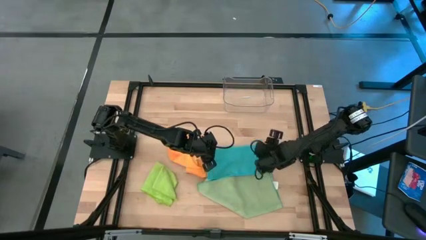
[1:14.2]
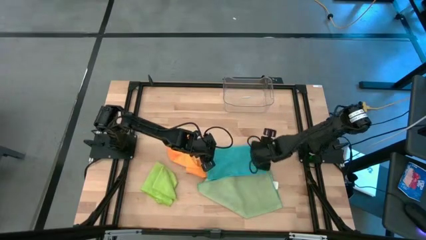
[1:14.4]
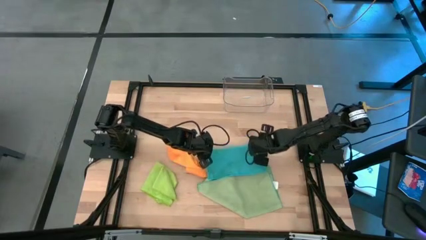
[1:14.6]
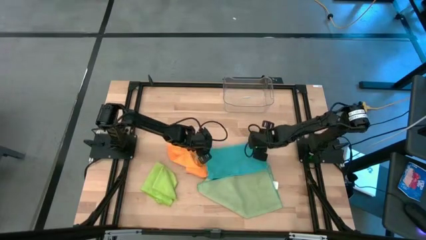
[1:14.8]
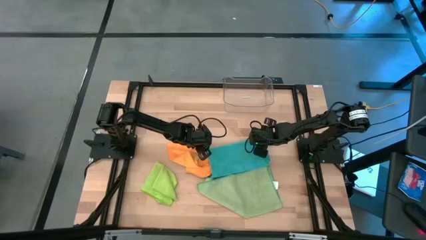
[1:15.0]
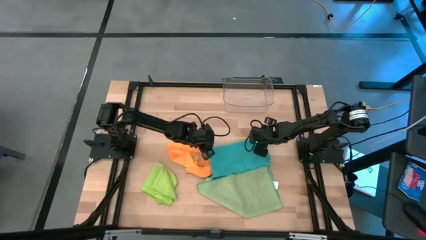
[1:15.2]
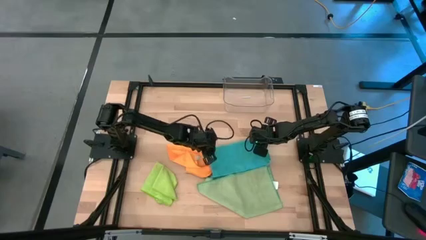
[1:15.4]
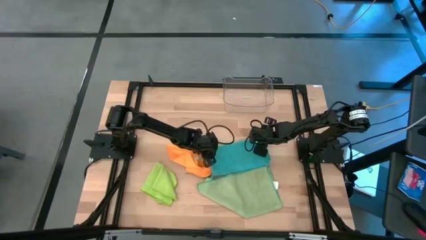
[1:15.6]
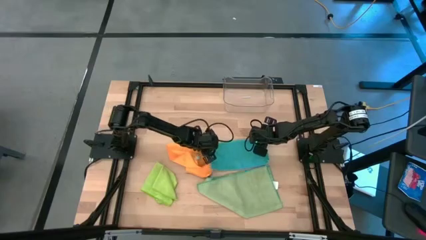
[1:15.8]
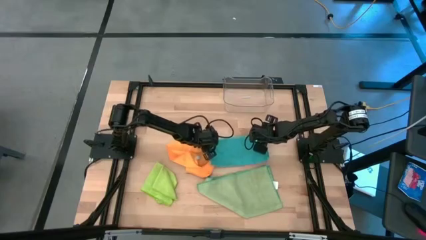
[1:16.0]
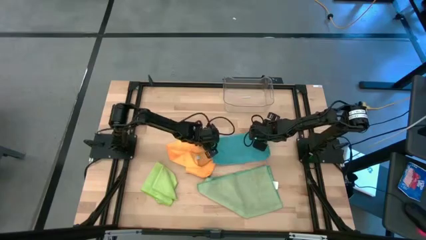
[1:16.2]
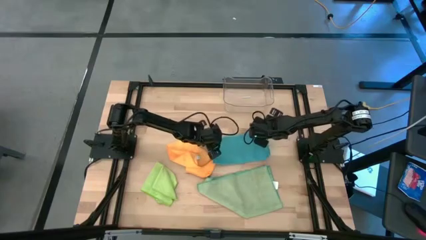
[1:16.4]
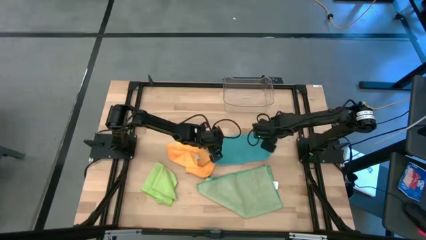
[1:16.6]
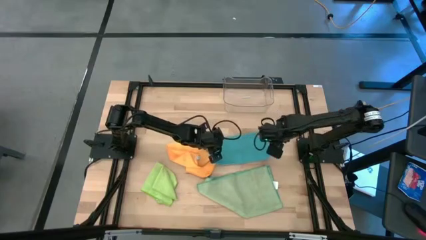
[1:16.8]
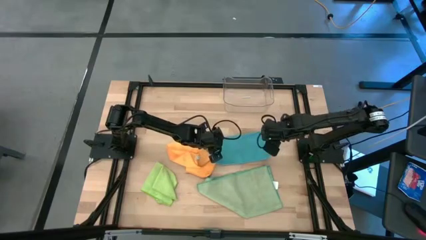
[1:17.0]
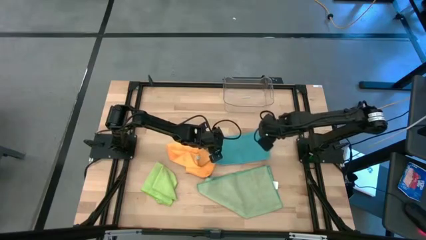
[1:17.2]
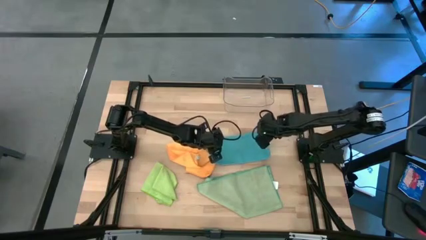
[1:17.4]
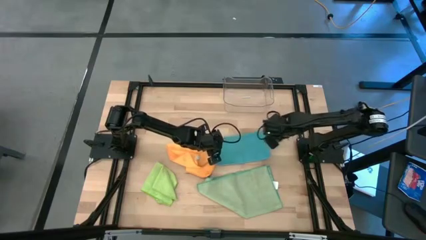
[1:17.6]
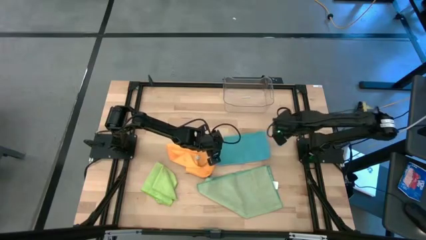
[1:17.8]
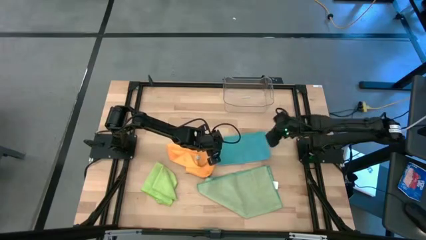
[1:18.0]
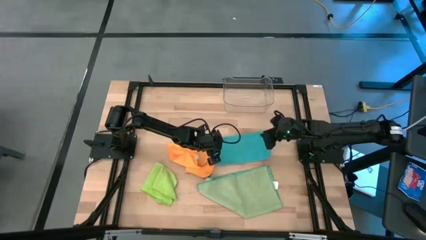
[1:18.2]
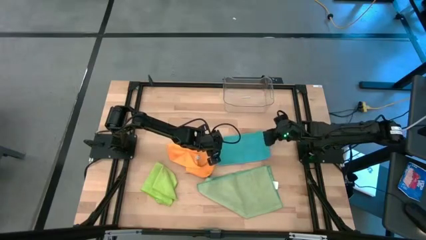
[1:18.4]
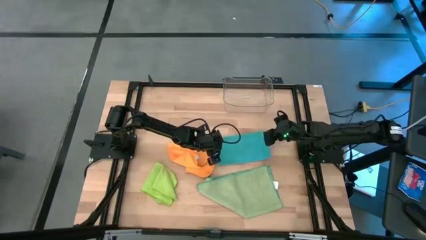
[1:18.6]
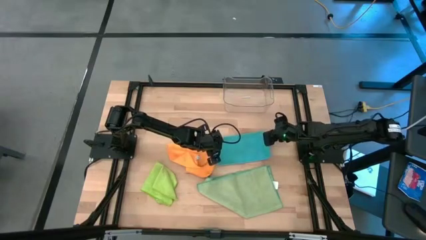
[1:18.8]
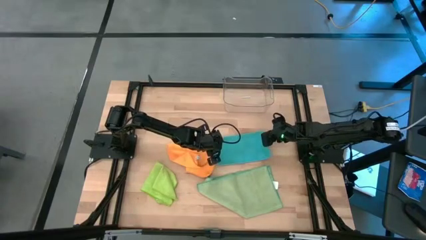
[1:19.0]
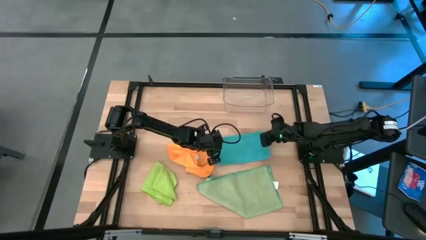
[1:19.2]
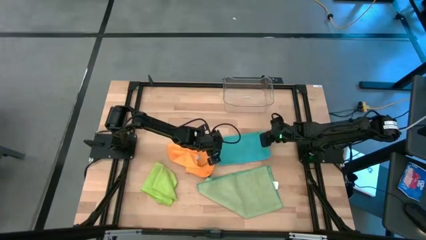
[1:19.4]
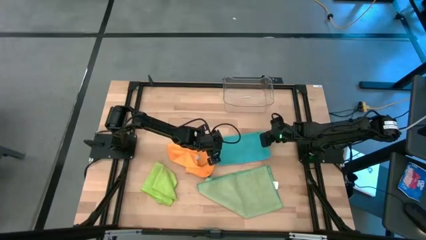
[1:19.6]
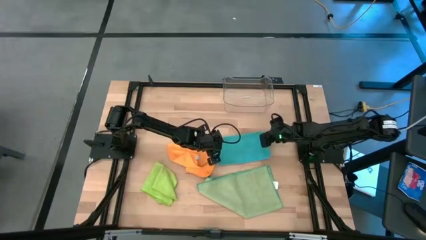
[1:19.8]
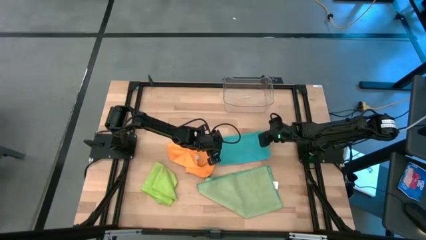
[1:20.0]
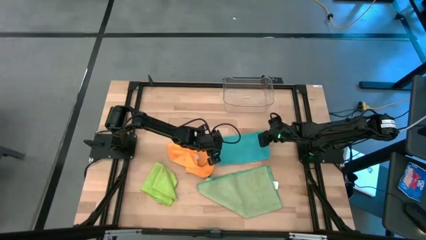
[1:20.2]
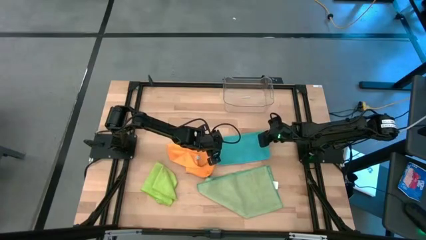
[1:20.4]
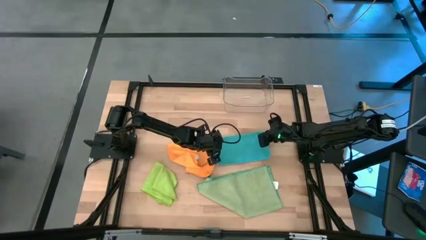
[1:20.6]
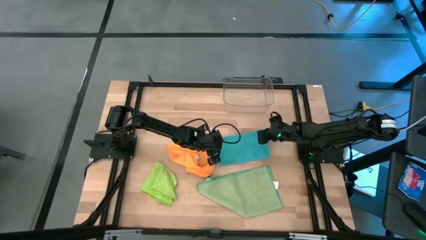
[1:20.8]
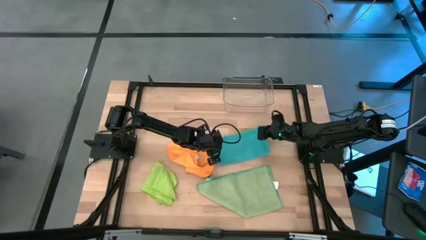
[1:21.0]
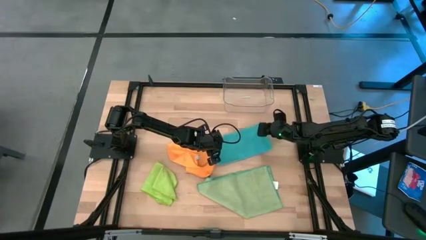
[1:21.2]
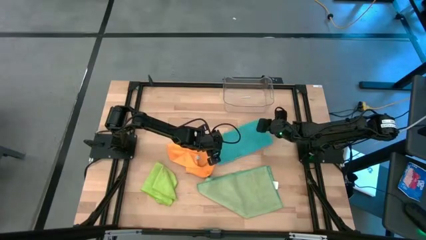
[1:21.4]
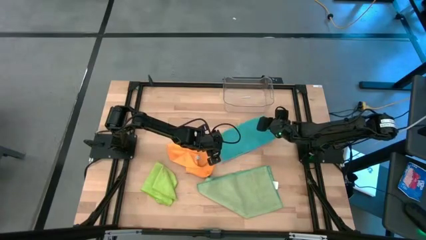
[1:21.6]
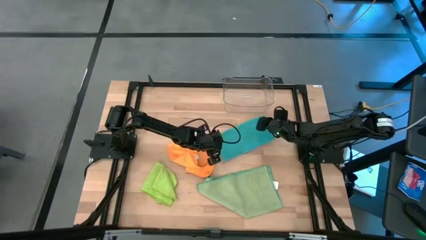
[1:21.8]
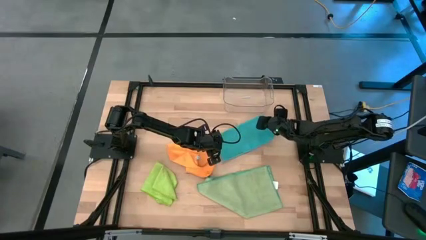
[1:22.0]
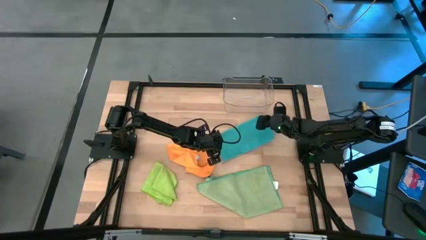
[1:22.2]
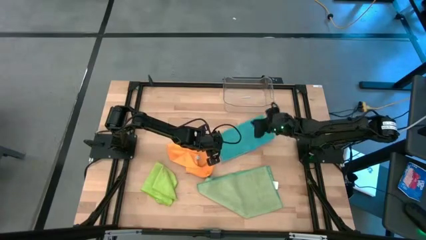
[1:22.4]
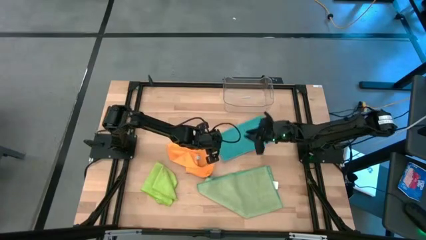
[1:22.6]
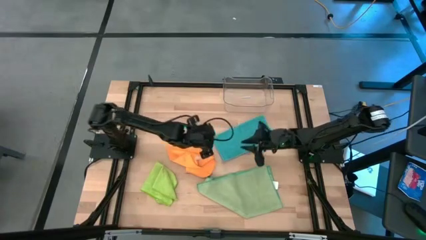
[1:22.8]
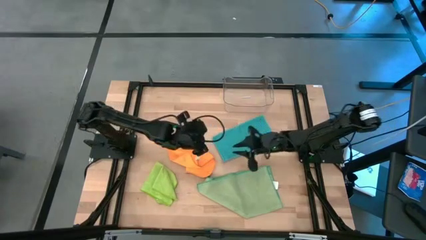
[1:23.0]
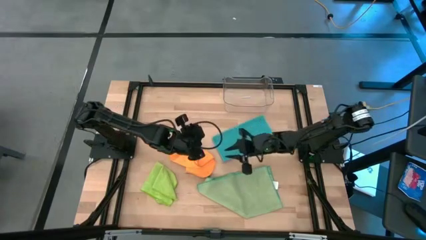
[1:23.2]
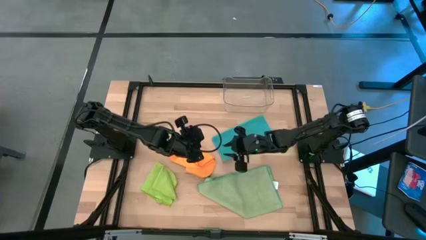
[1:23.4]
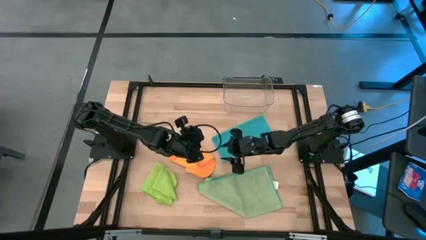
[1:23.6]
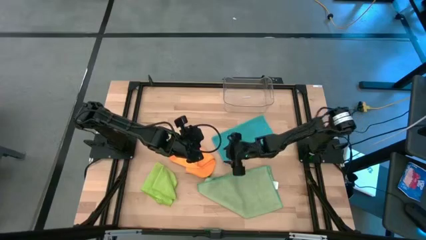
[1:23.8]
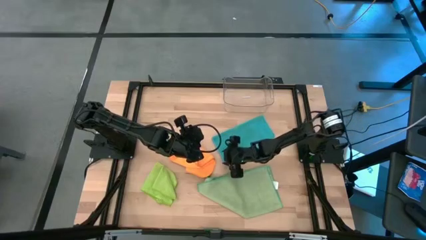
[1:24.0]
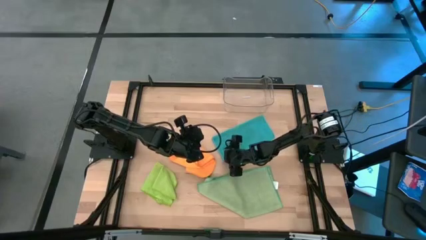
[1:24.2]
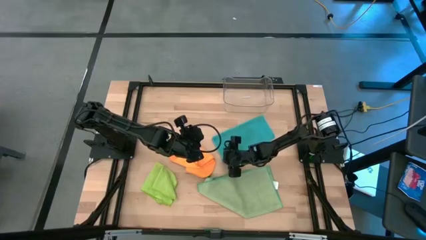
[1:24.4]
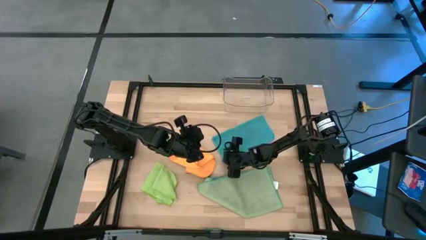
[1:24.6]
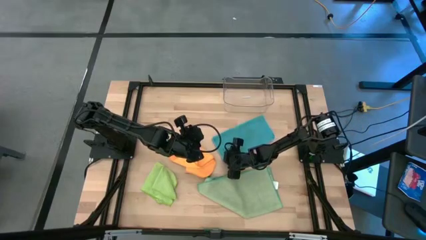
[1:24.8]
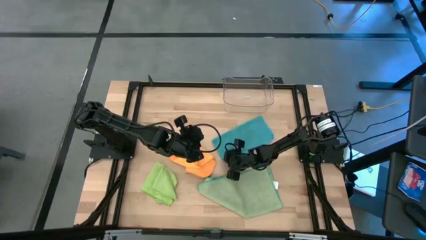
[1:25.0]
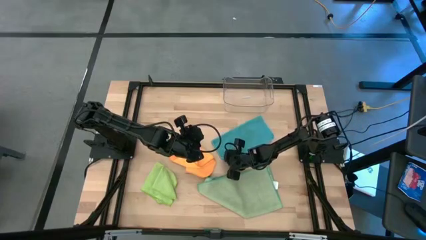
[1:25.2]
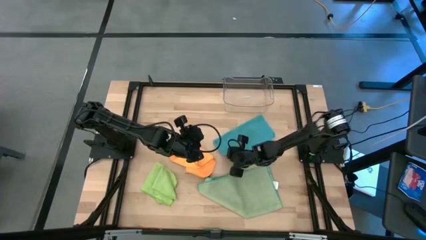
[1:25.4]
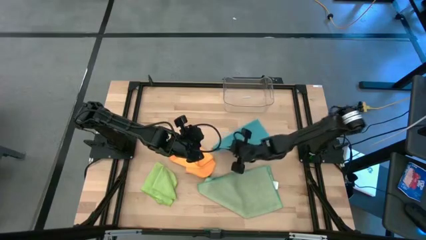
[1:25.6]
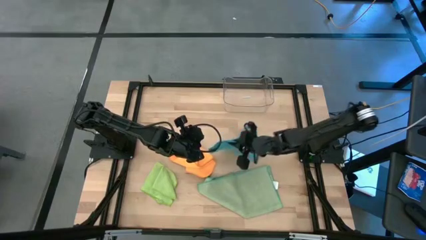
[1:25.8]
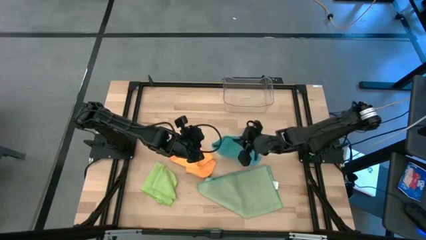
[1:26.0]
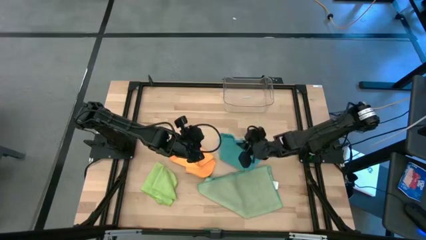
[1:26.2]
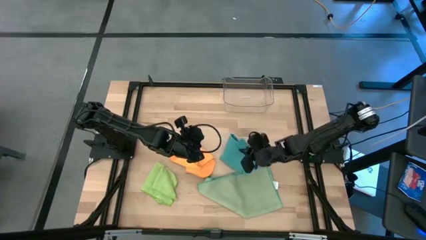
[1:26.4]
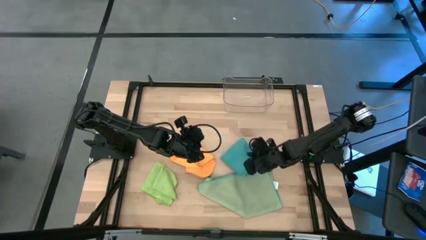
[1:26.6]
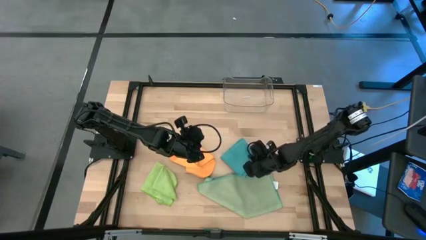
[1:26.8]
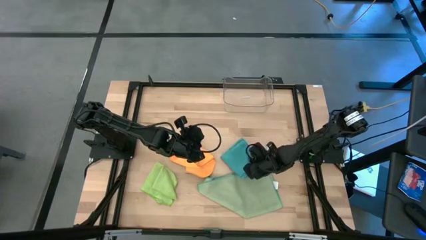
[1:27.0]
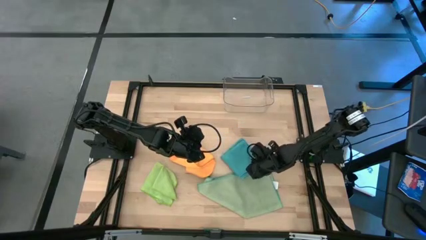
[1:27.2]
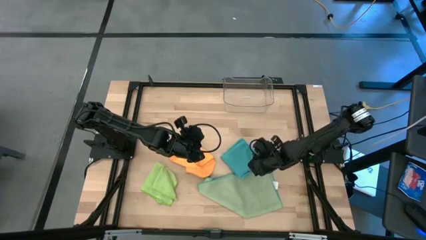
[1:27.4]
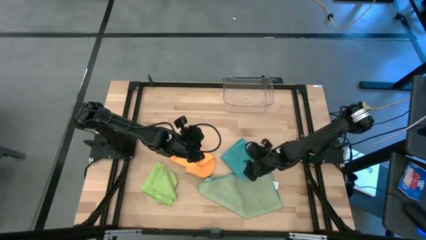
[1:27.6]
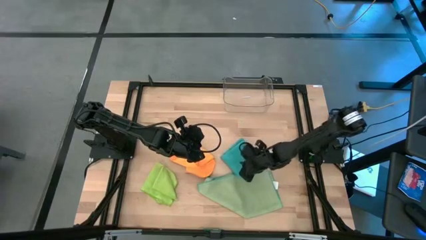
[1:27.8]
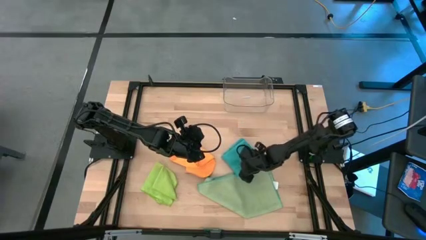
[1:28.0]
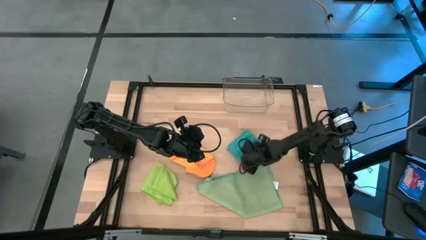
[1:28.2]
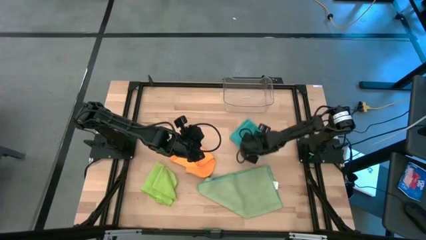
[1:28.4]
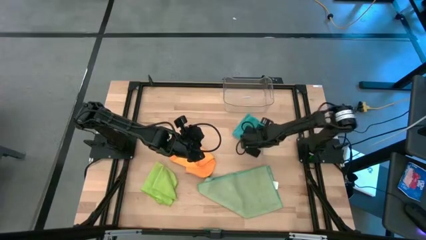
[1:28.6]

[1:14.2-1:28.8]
Task: Fold microfiber towels
Fold the blue microfiber cloth
